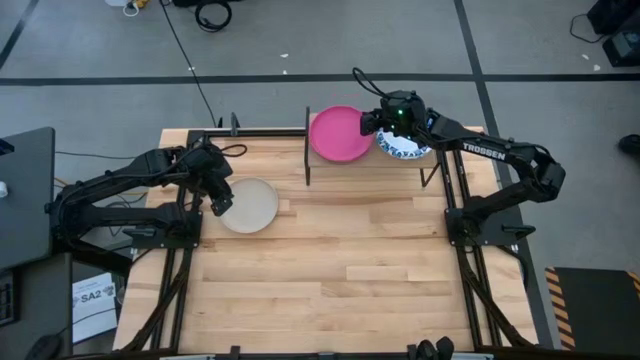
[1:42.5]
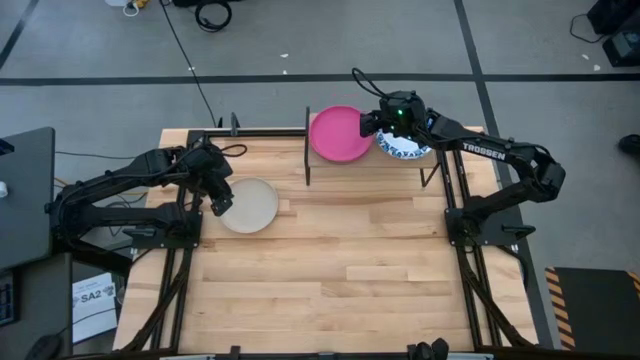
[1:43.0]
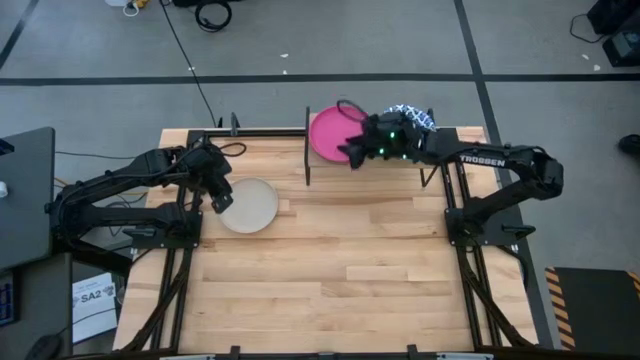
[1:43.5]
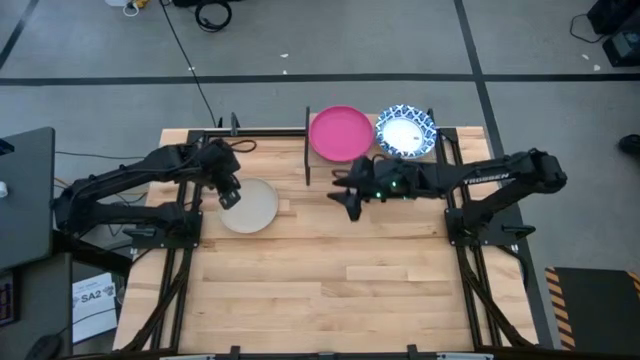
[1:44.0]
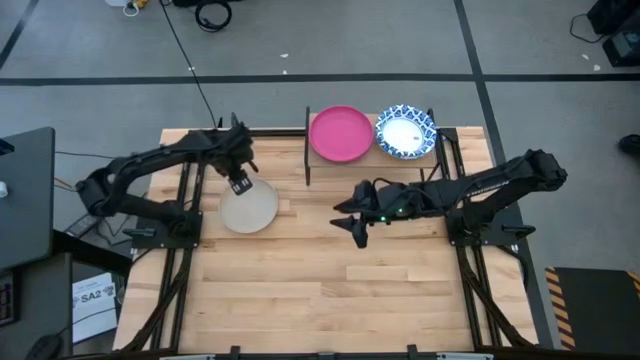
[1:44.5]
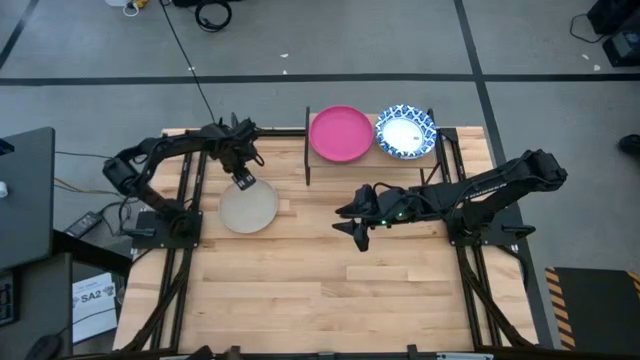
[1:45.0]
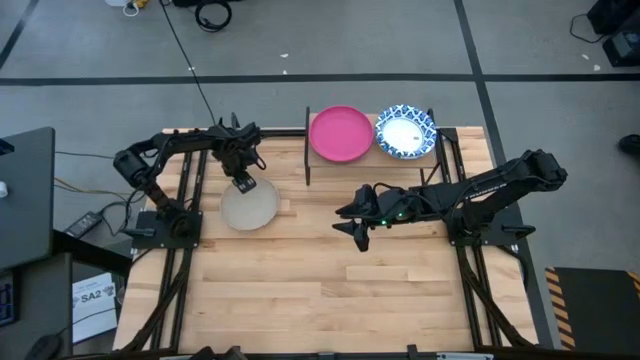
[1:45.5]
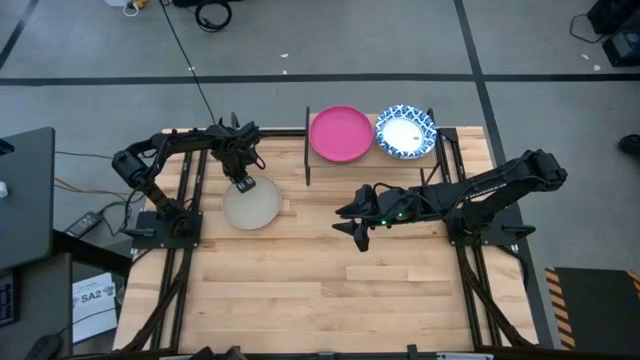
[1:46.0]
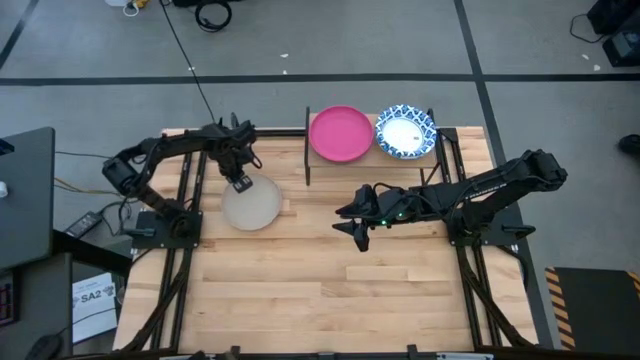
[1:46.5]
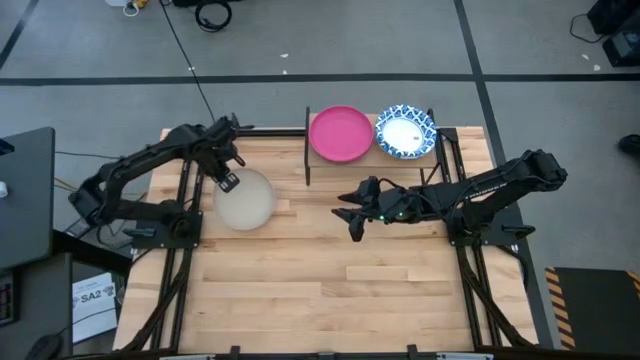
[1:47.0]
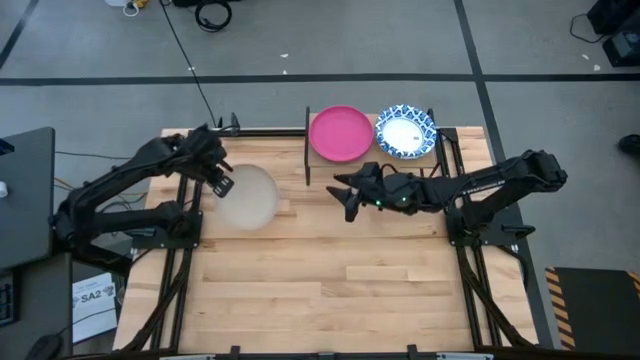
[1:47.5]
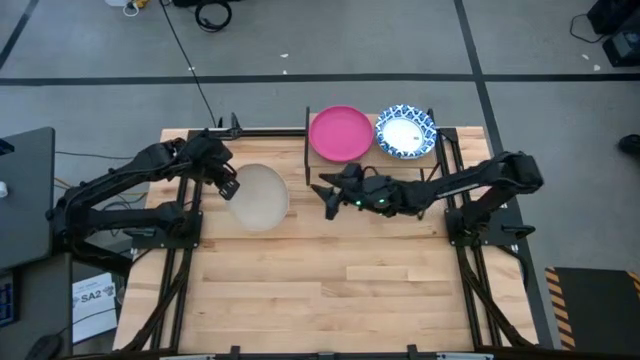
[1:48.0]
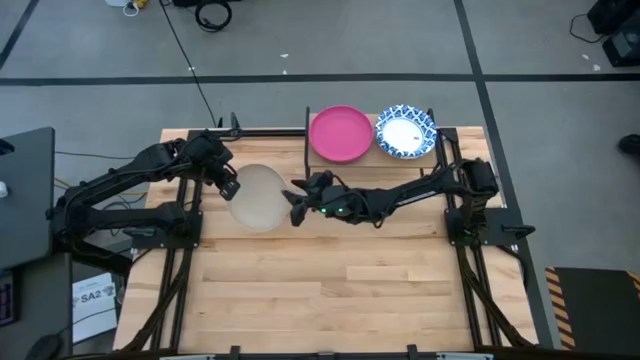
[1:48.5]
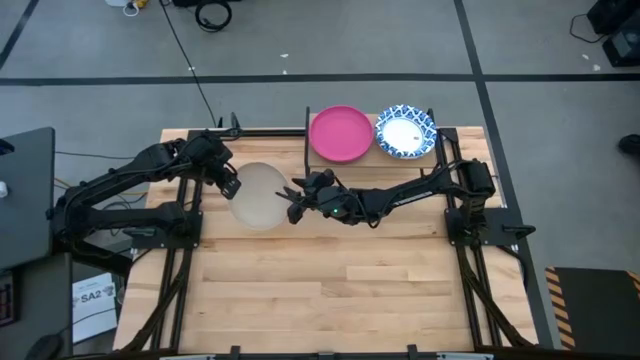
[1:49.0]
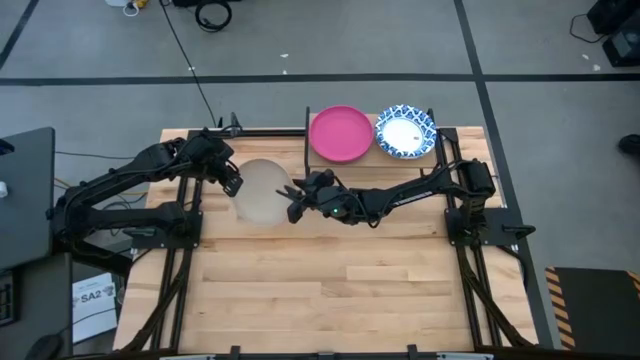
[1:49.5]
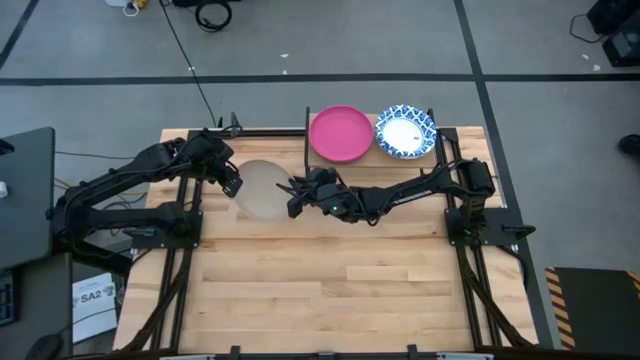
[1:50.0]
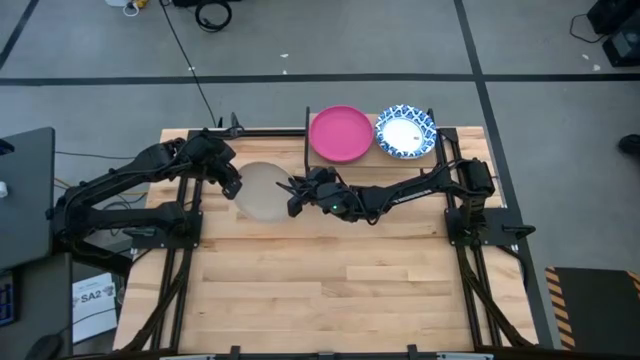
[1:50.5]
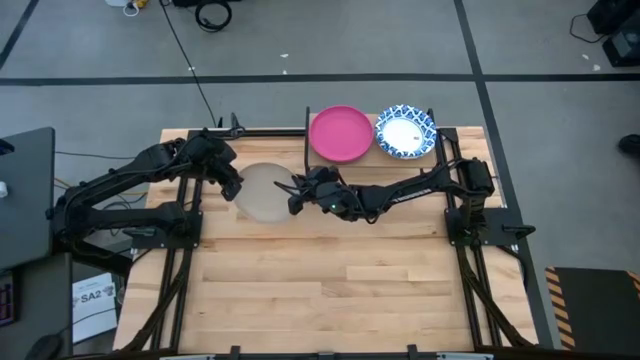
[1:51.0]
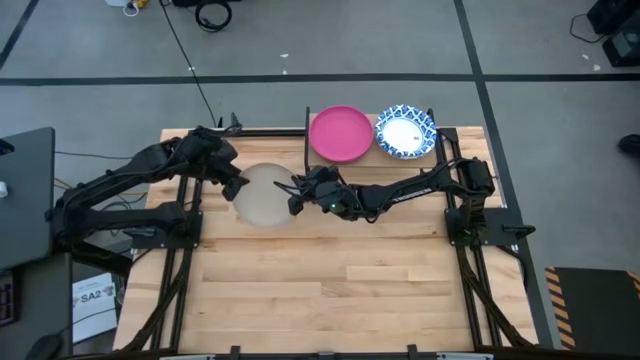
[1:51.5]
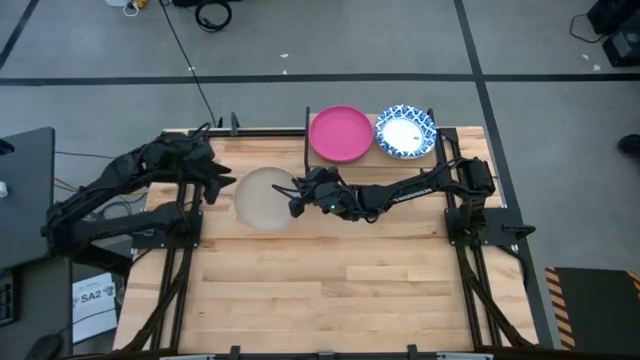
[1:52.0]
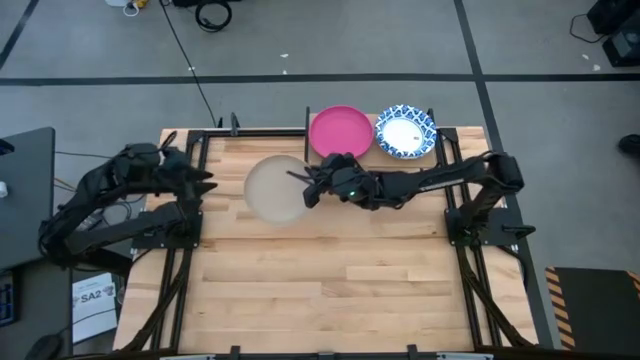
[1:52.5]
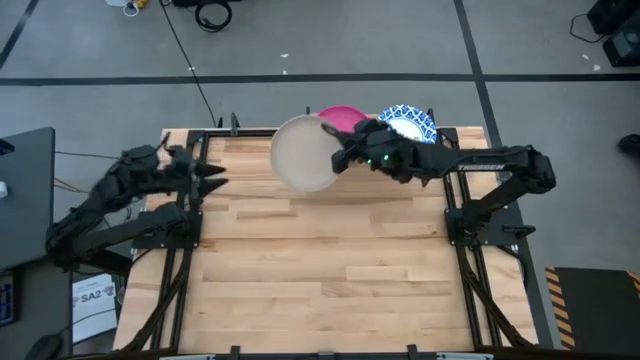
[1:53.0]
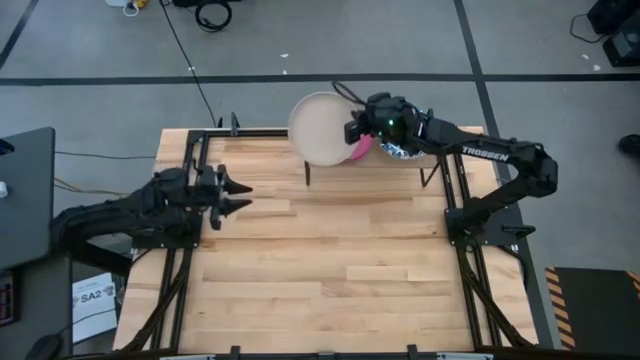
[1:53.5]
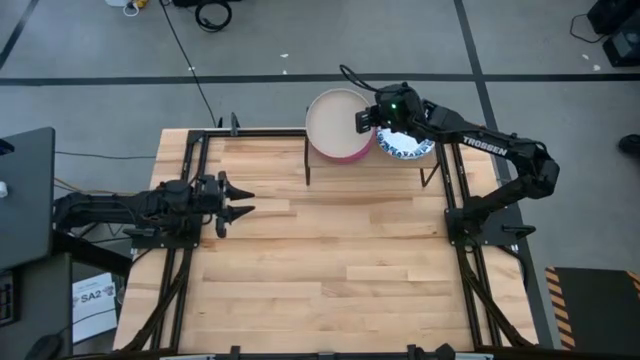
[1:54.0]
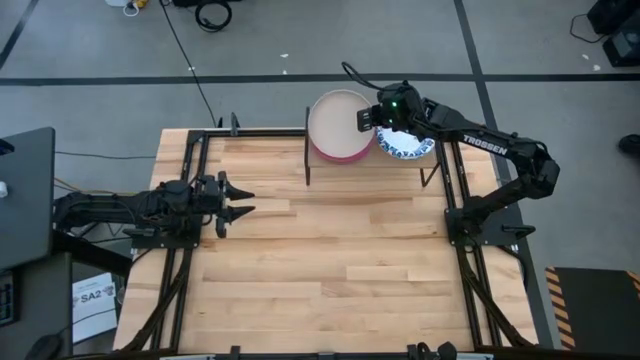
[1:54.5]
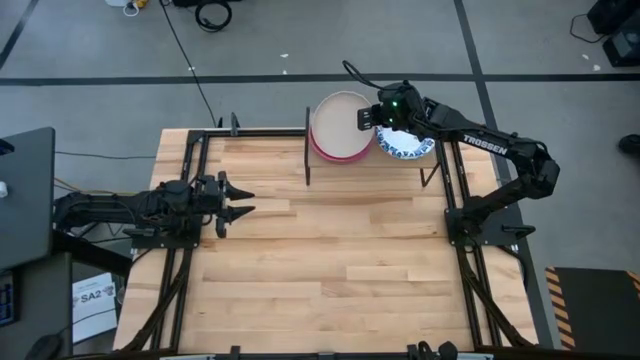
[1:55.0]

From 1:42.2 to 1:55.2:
Task: Place and stack plates onto a shelf
Stack the gray plate on top of the pink plate on the shelf

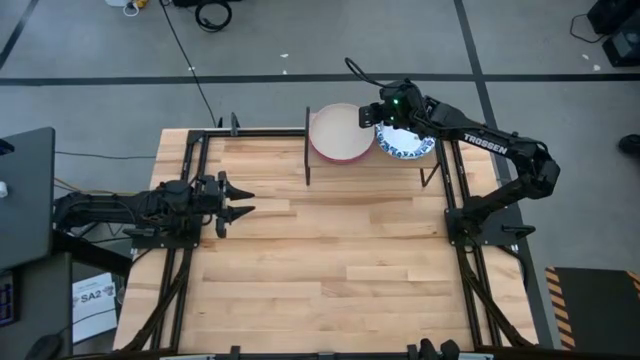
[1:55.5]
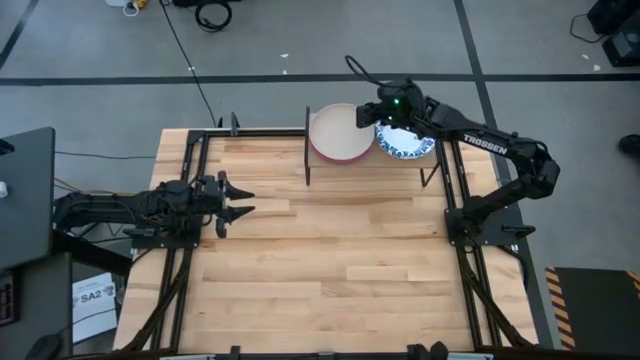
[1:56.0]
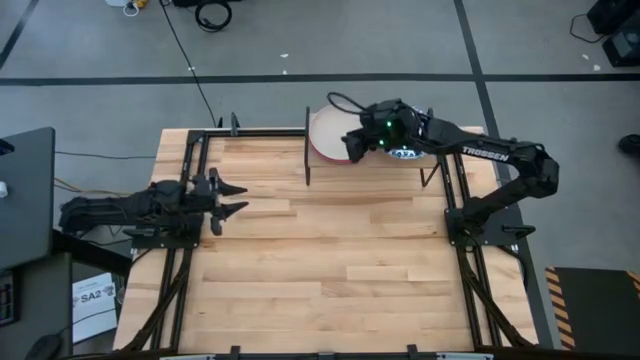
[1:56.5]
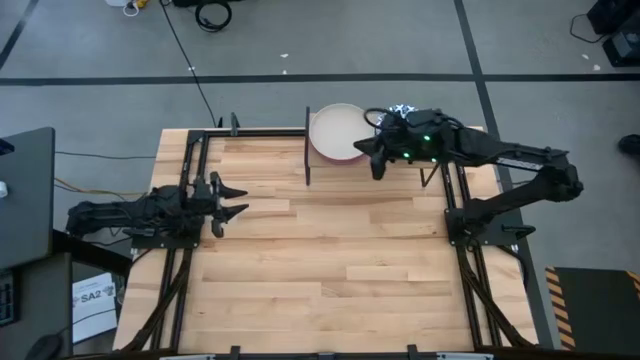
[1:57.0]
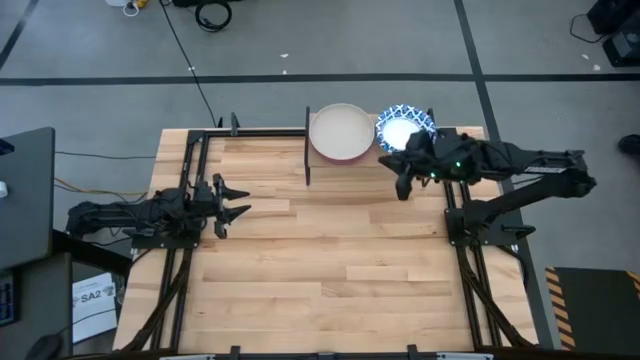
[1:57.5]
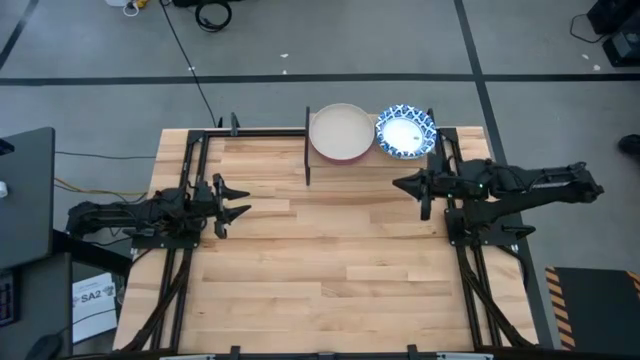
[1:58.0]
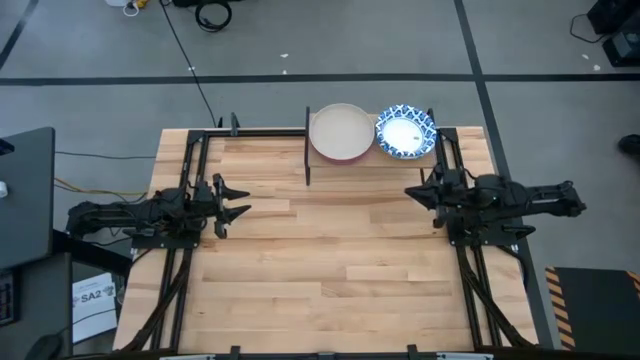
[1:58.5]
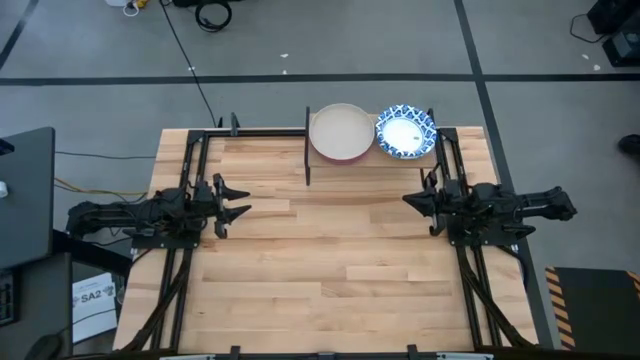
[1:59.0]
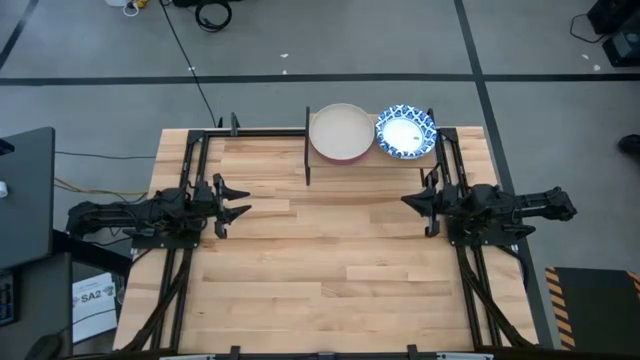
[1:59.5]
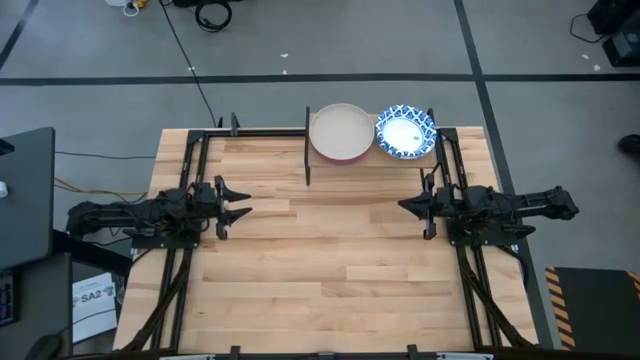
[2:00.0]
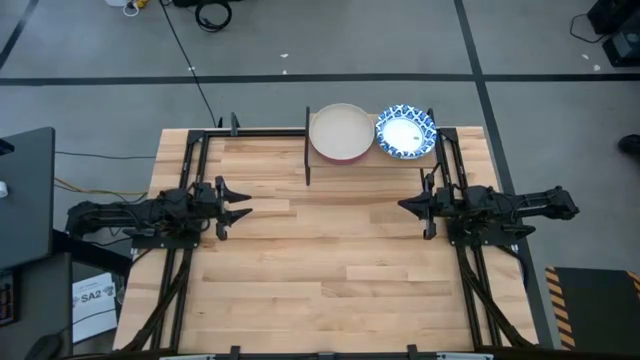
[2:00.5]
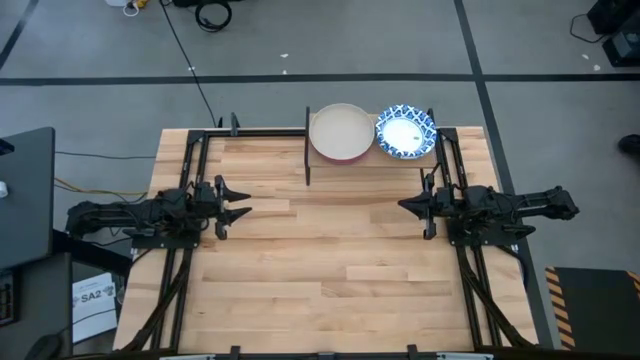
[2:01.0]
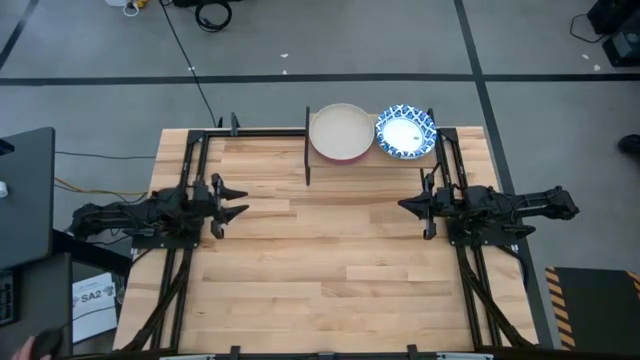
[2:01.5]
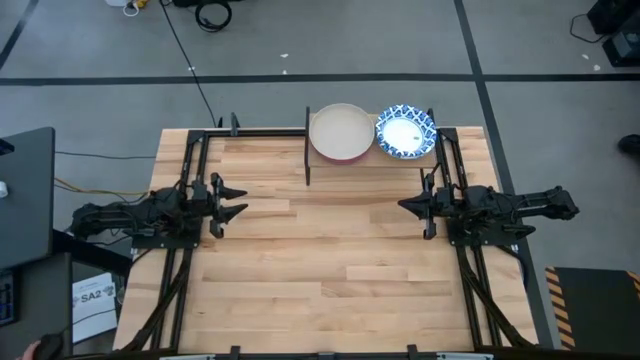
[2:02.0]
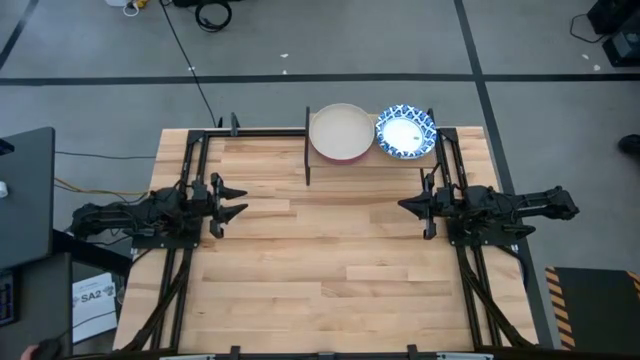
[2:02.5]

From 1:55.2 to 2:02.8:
Return to Home Position

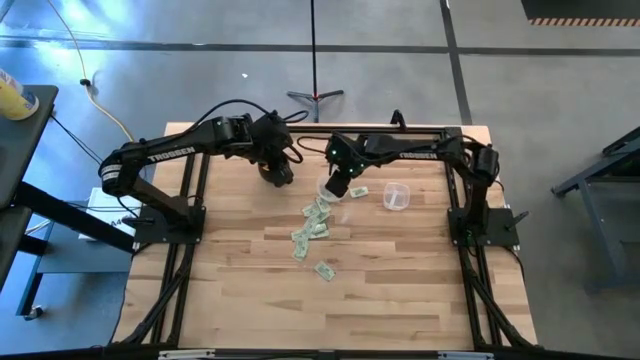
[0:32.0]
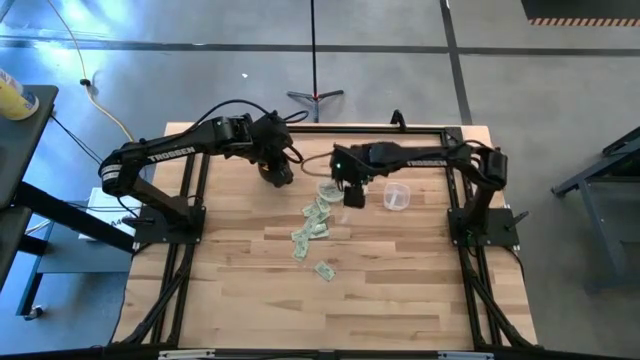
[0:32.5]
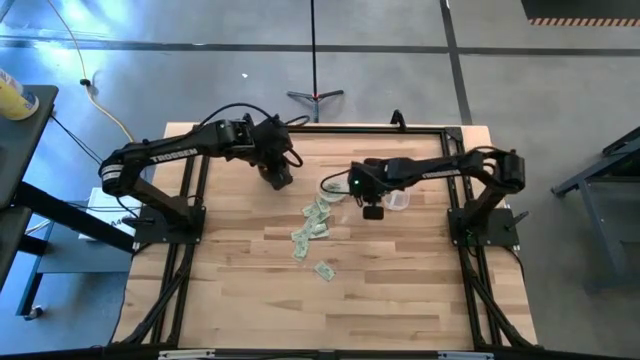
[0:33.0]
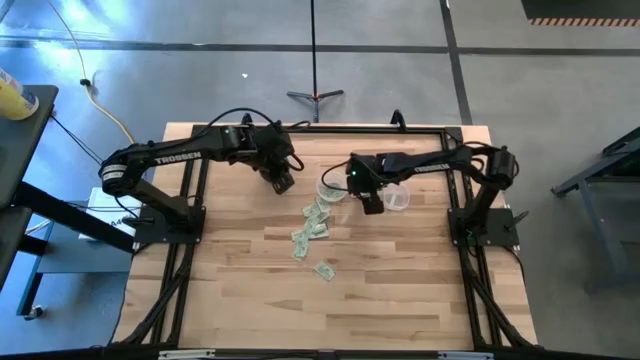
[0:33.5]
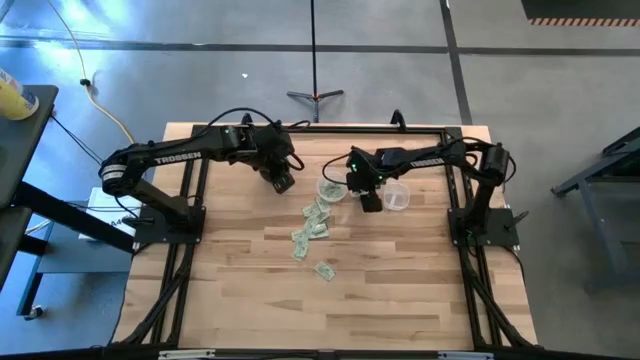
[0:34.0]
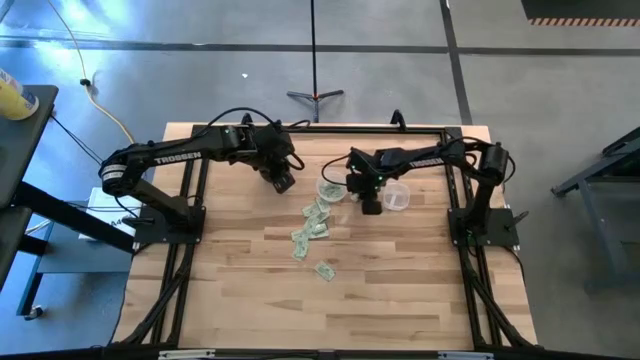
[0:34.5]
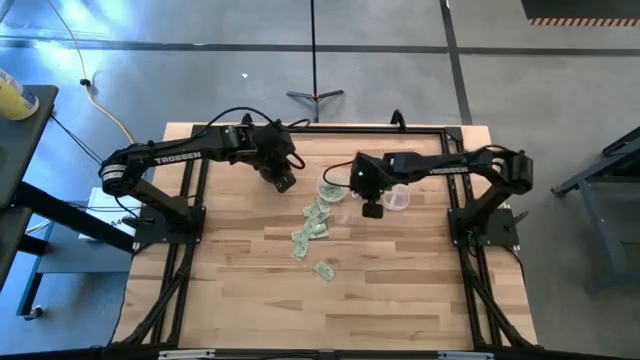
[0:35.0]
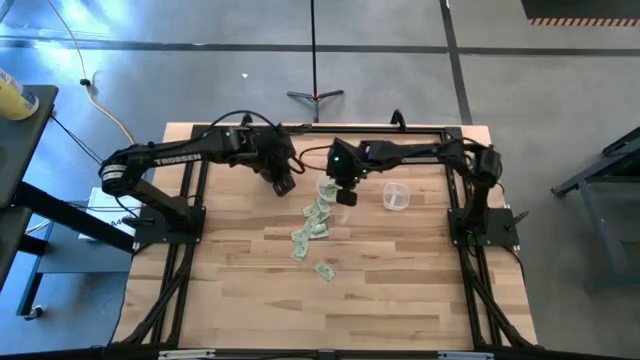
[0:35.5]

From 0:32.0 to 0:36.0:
Task: Pick and place items into bin
Put the light green stevia packet into the left transparent bin
